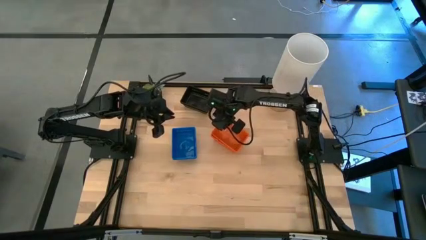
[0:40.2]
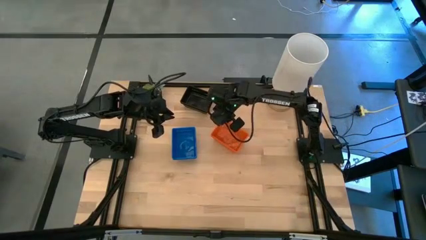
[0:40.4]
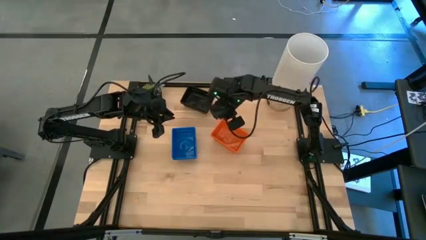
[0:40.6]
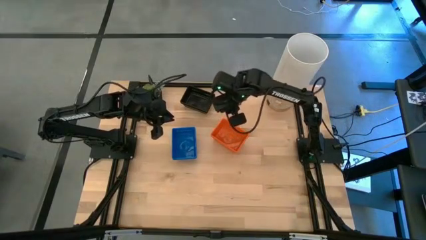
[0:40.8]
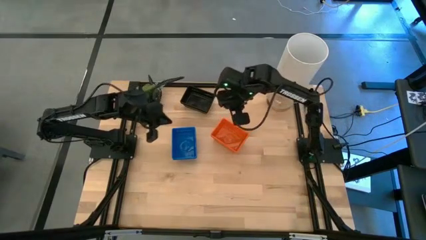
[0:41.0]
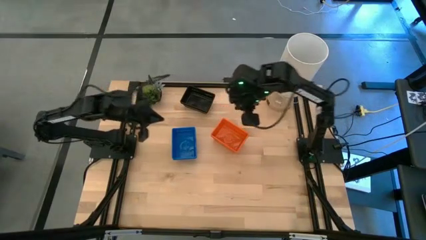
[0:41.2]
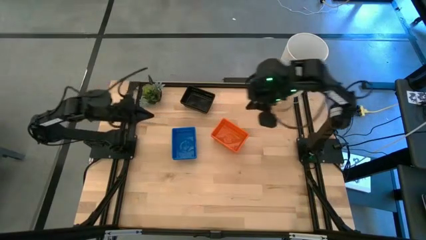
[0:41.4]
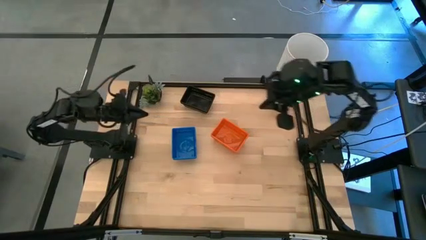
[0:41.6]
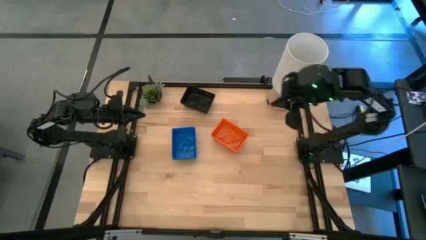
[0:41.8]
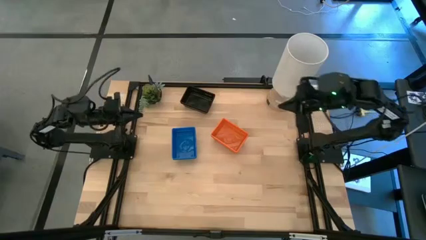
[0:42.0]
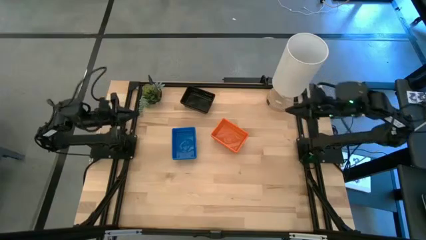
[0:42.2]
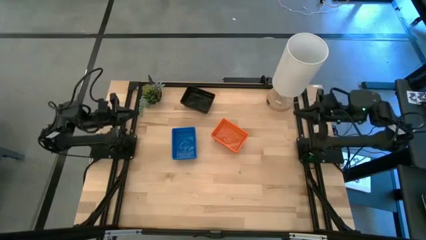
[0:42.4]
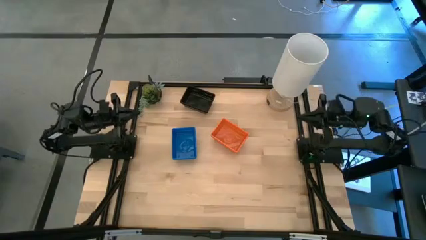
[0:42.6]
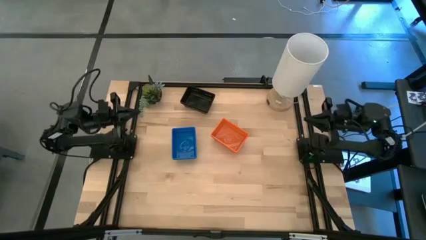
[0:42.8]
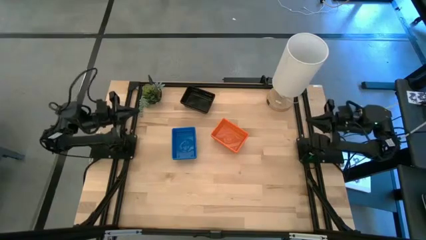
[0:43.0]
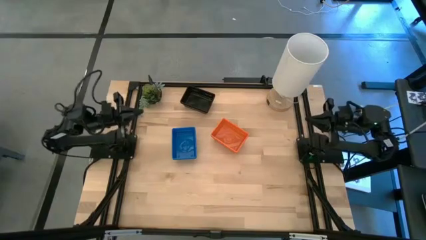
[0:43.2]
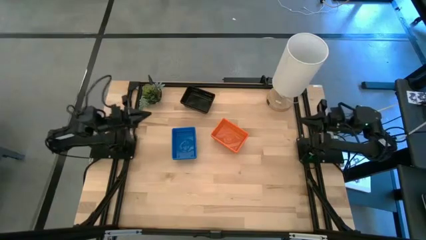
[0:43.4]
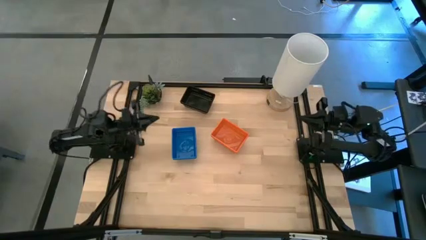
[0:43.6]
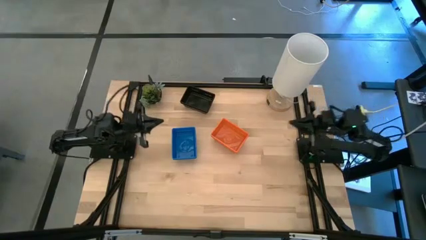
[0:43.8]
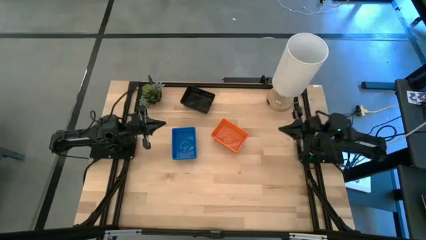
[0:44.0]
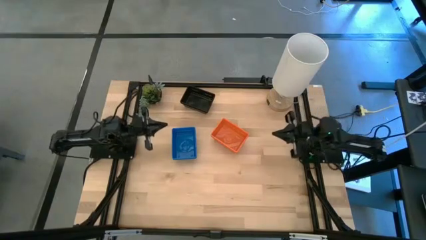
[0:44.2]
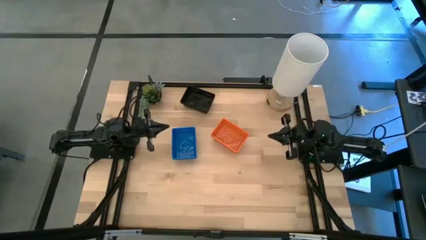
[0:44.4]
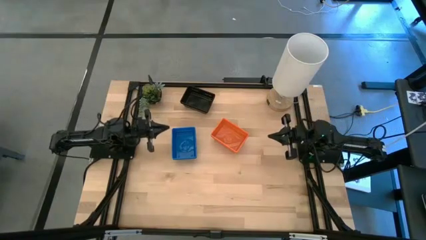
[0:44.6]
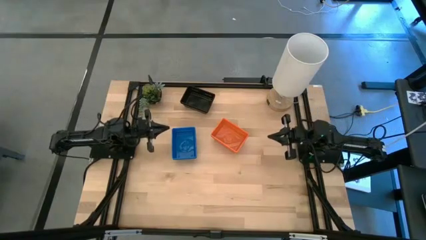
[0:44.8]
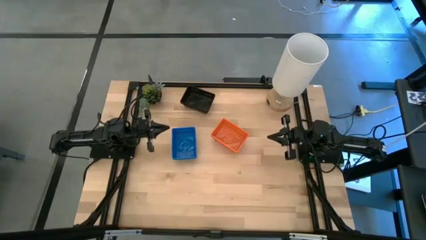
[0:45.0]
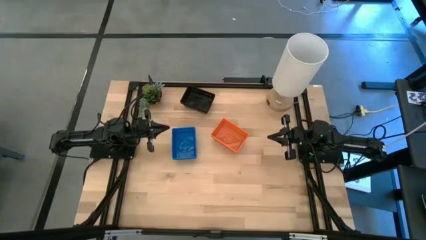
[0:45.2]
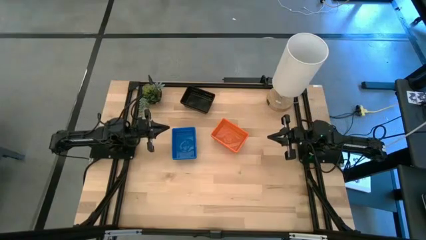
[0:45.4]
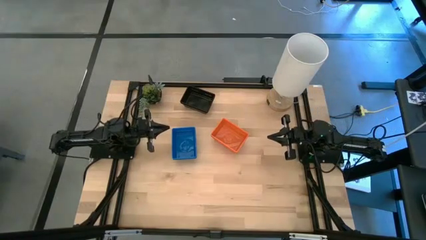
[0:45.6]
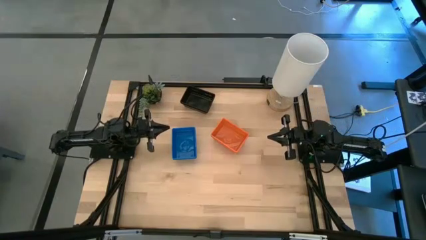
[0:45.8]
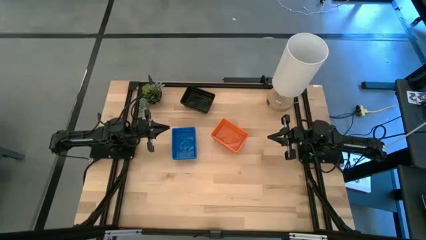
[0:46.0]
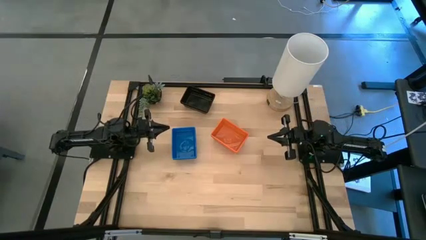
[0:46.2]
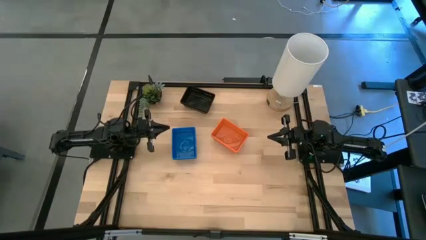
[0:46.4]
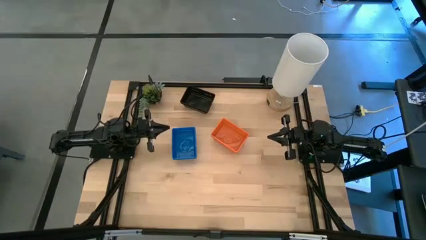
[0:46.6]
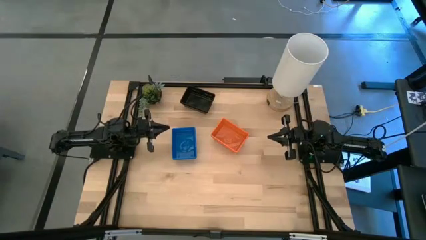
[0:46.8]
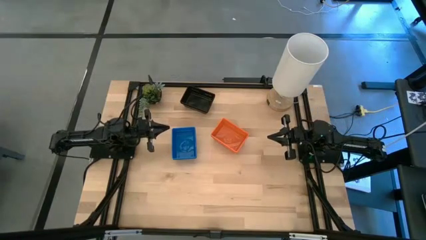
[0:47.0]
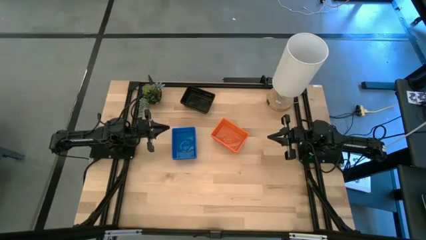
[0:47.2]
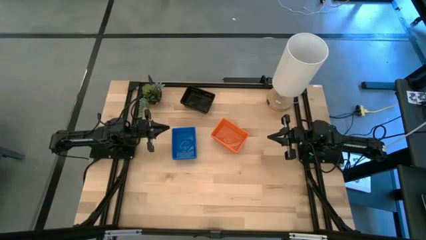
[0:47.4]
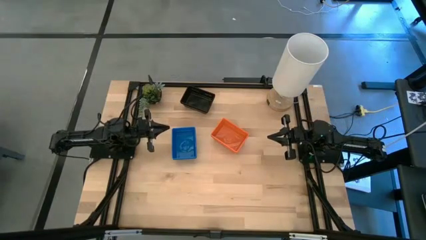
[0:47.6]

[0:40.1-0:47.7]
Return to Home Position

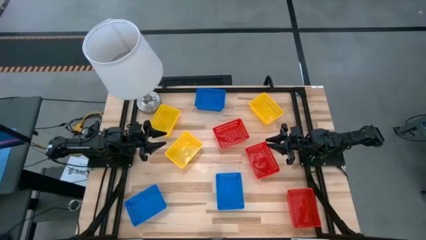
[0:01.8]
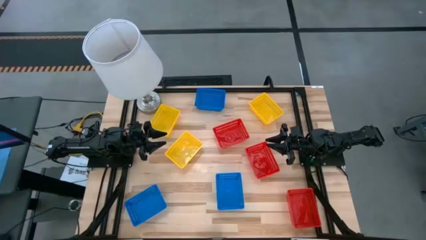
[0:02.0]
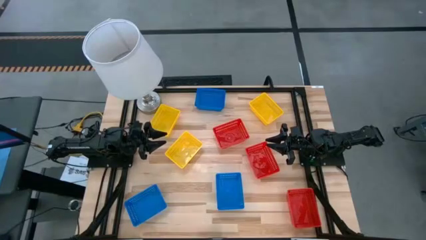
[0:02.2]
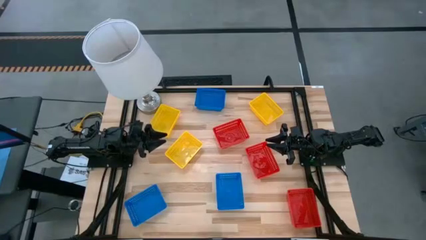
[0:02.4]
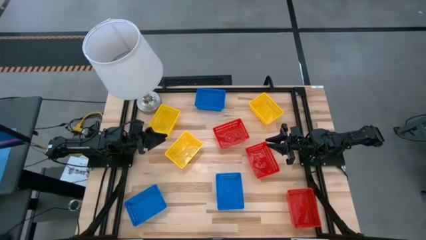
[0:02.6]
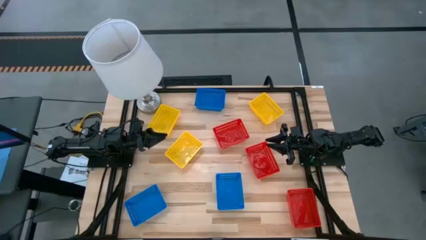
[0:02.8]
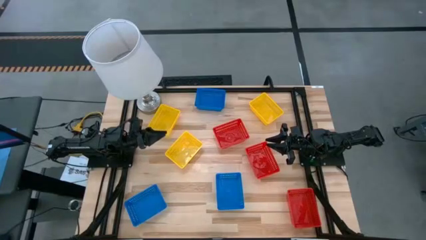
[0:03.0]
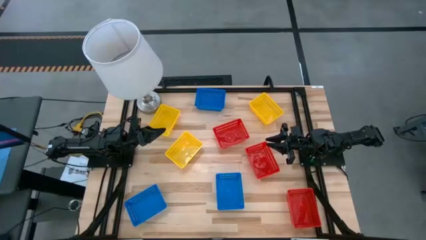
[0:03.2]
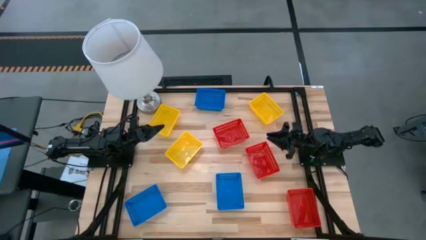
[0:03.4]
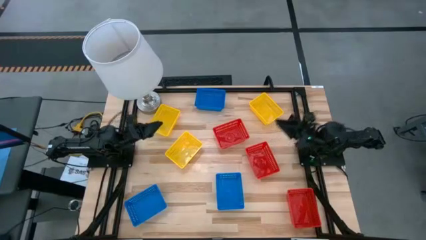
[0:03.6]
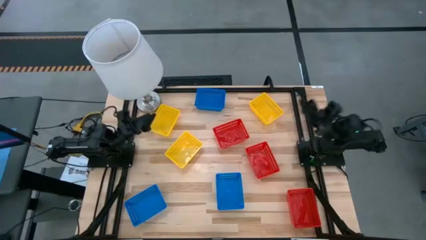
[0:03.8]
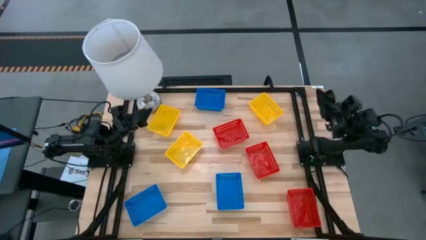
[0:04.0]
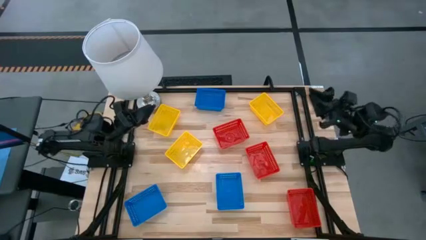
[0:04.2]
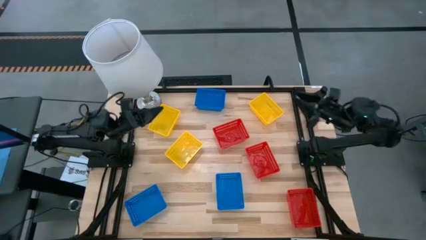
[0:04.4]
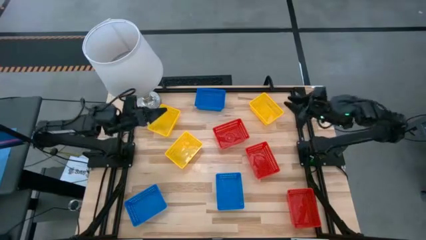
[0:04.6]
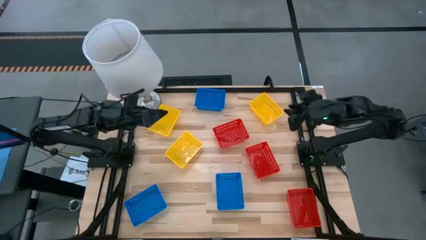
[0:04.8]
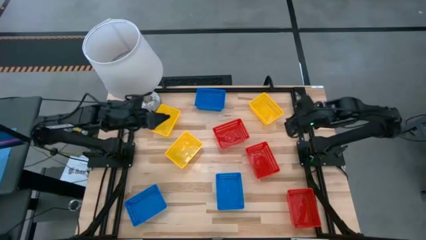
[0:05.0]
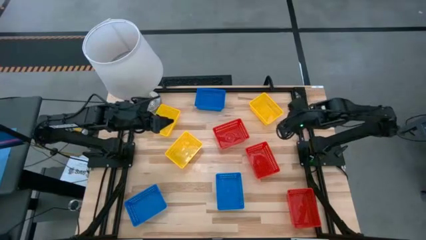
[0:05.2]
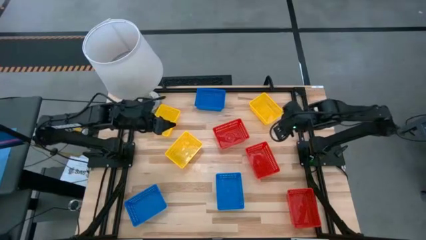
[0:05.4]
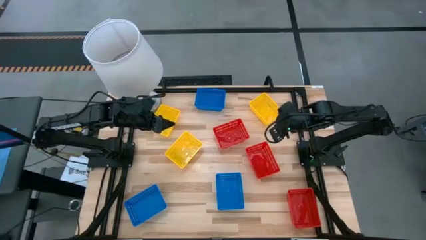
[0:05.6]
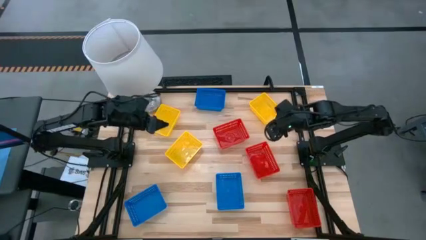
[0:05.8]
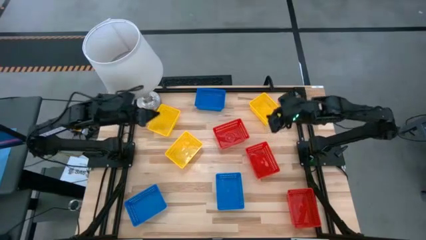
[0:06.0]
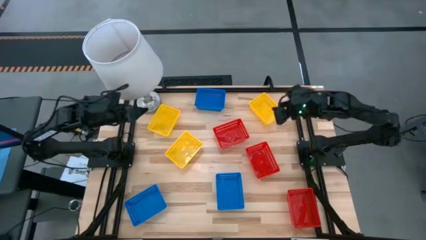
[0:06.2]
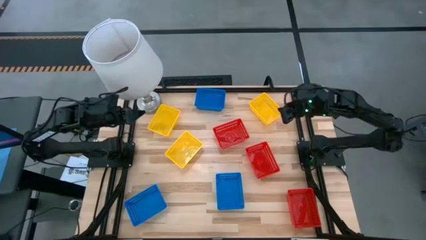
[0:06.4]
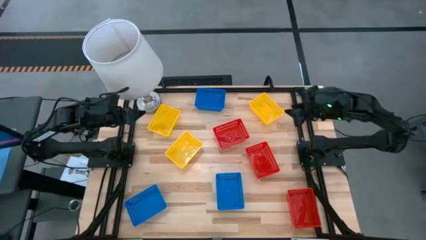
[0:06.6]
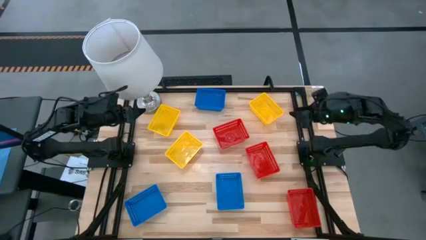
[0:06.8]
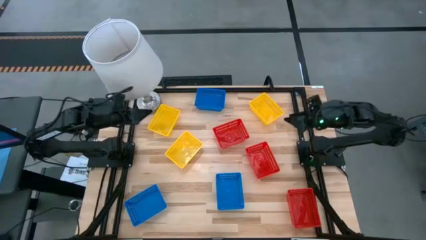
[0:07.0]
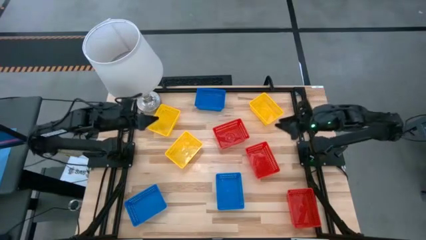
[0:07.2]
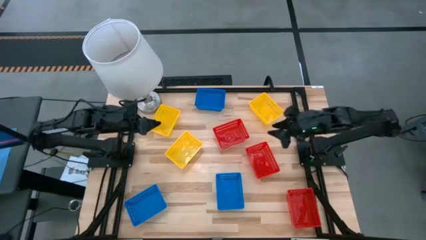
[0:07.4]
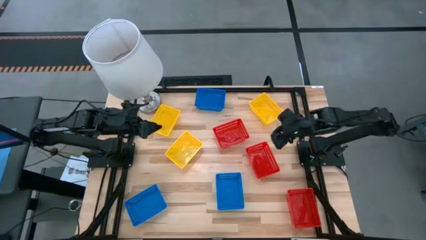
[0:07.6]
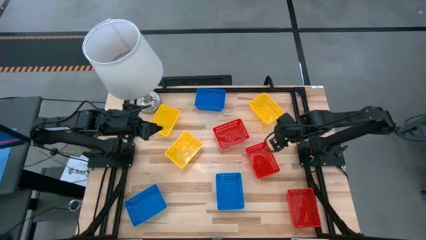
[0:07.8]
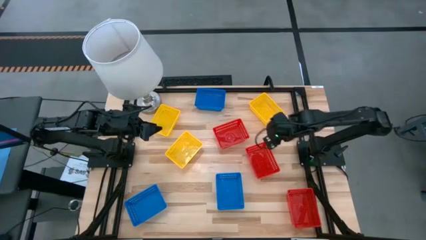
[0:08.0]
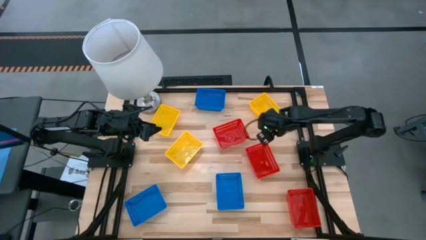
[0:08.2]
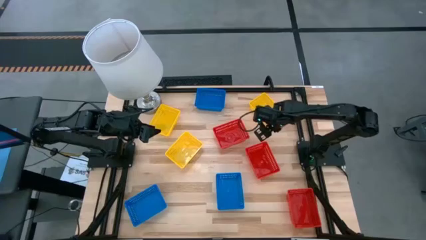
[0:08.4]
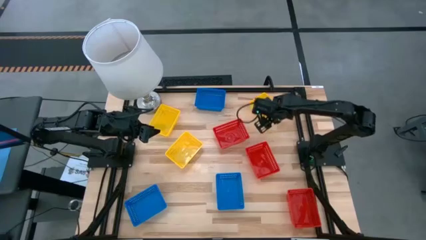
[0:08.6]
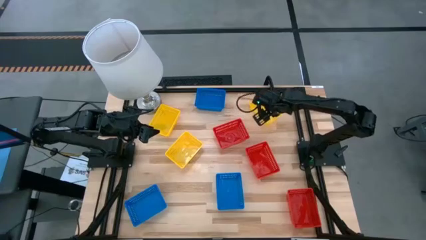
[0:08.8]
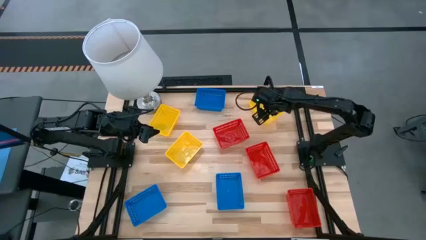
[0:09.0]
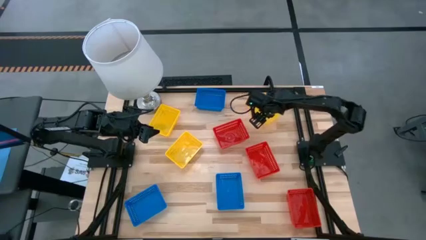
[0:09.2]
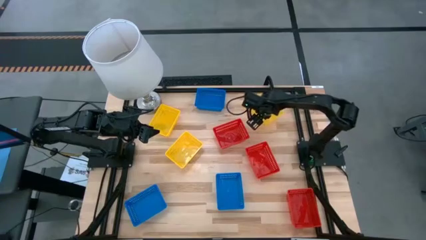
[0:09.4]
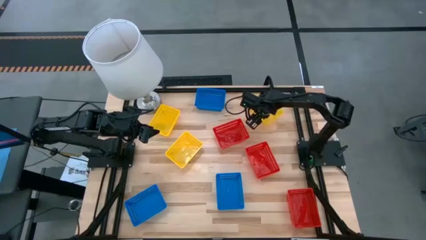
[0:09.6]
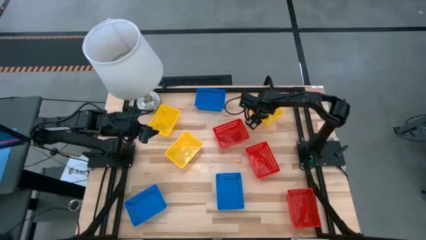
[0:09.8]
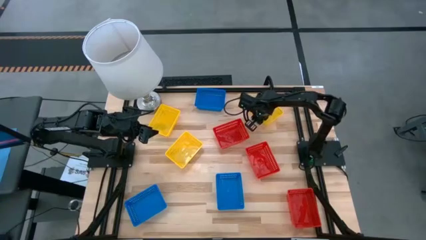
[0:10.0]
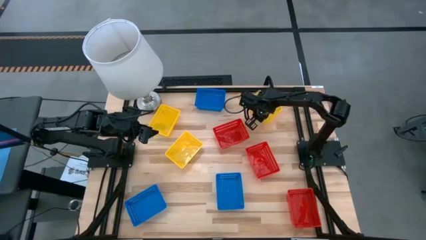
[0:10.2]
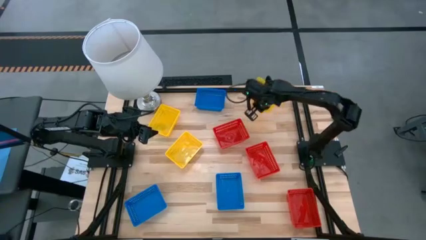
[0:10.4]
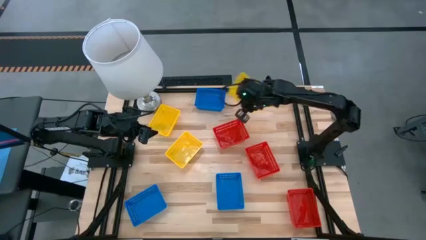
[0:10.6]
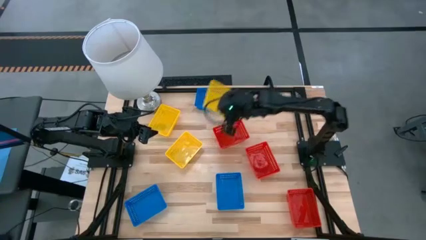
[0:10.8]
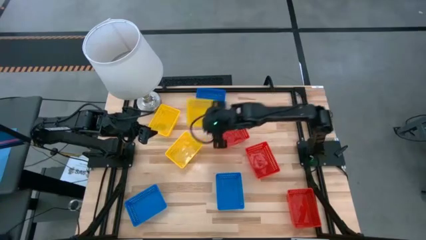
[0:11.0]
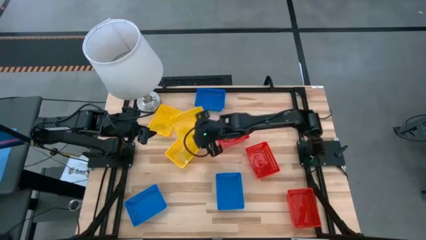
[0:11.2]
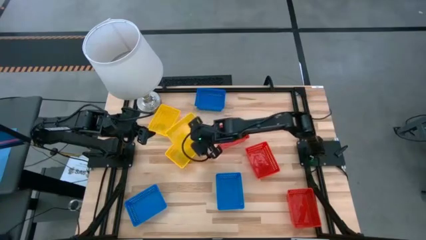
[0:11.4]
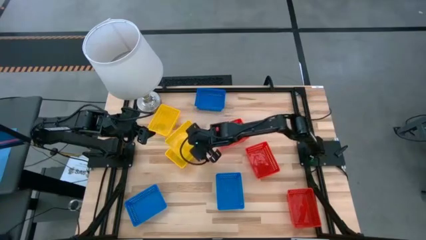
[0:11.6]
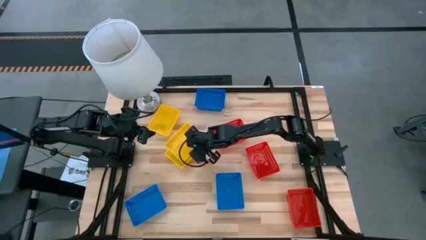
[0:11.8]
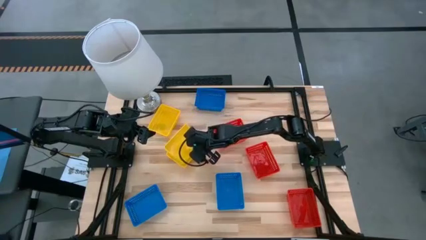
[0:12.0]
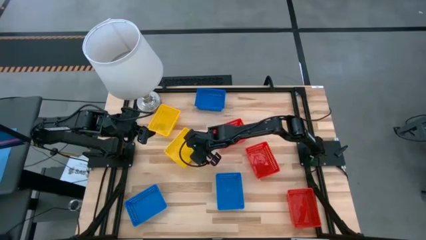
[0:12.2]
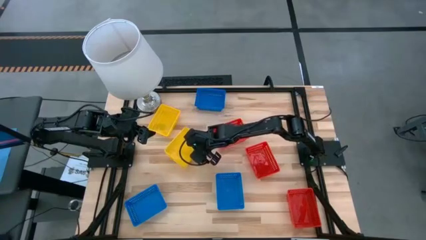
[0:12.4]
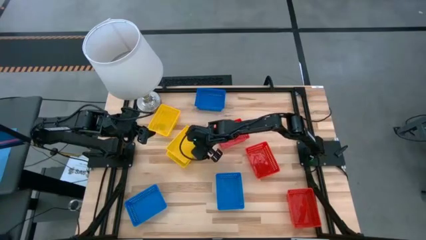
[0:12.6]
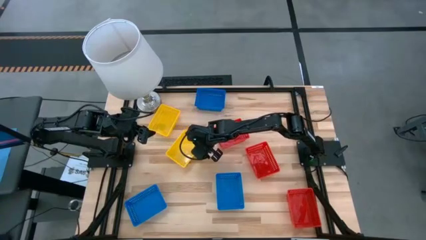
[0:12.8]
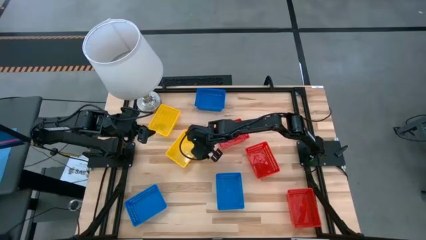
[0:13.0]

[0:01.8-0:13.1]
Stack the top right yellow basket on the bottom yellow basket
